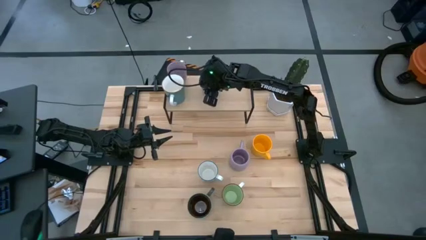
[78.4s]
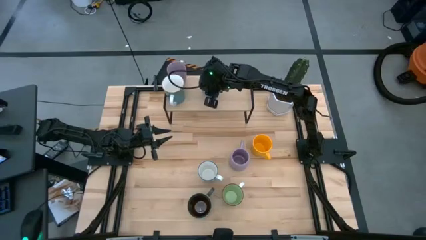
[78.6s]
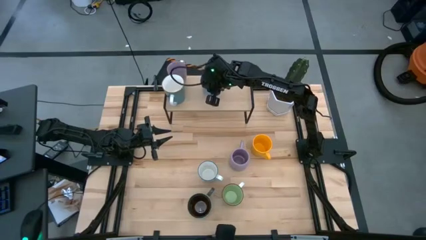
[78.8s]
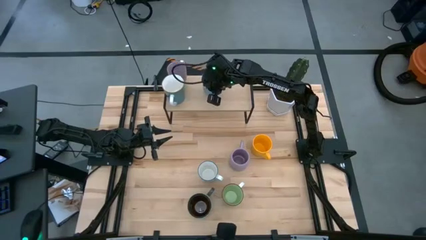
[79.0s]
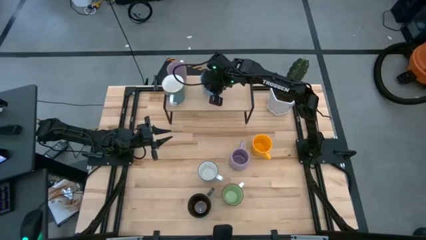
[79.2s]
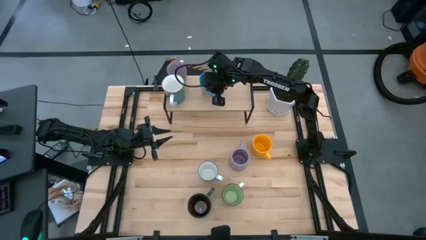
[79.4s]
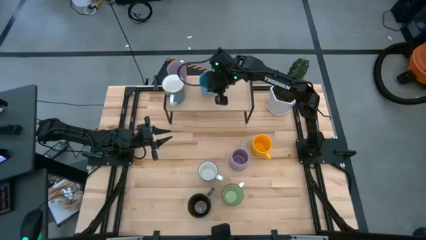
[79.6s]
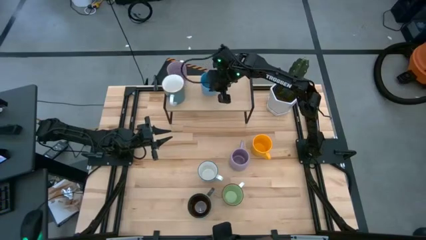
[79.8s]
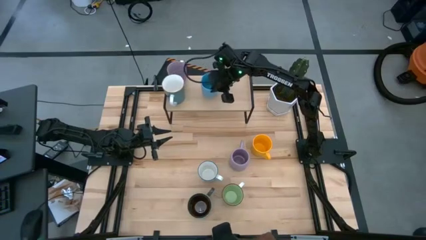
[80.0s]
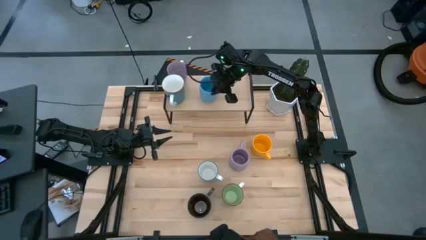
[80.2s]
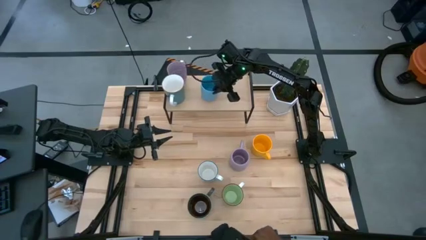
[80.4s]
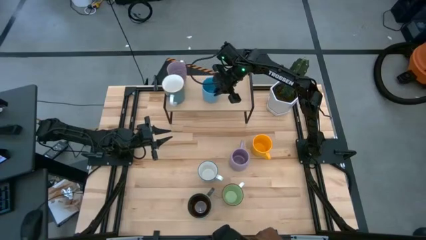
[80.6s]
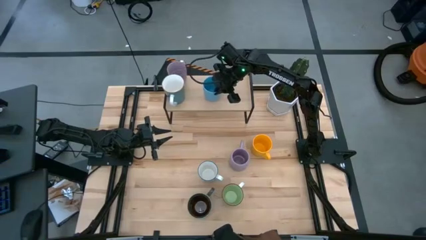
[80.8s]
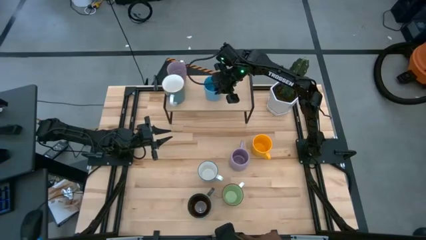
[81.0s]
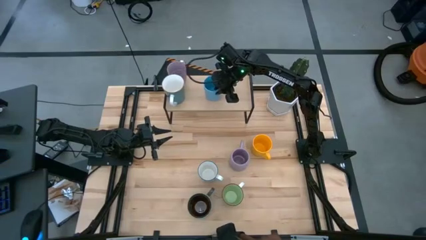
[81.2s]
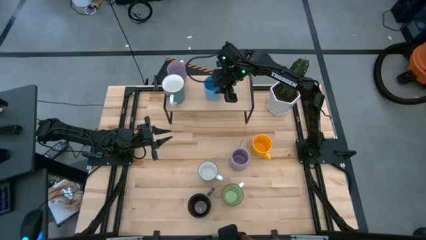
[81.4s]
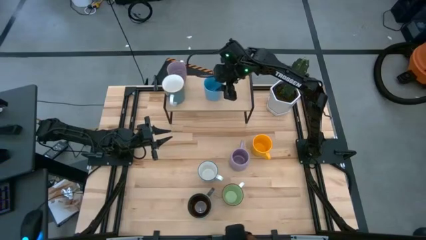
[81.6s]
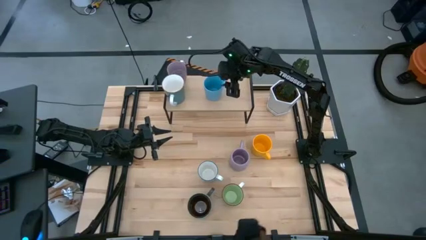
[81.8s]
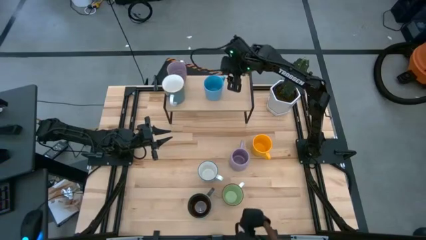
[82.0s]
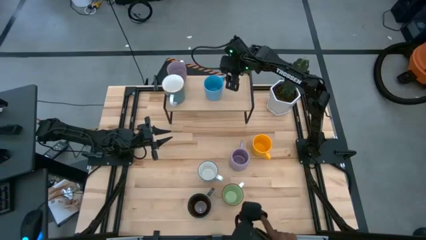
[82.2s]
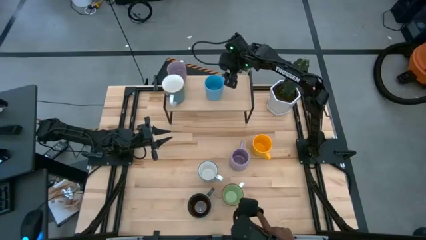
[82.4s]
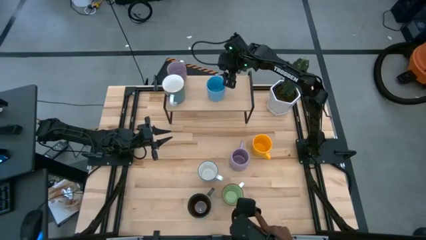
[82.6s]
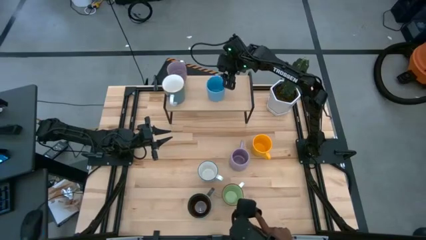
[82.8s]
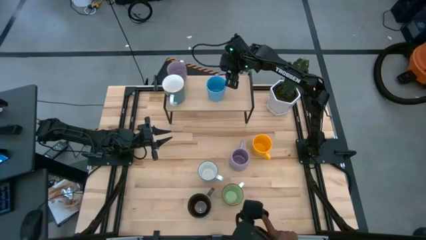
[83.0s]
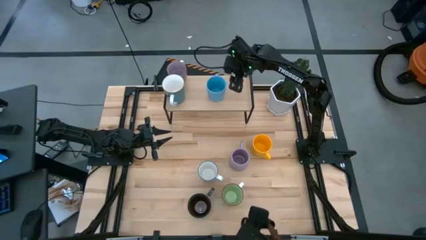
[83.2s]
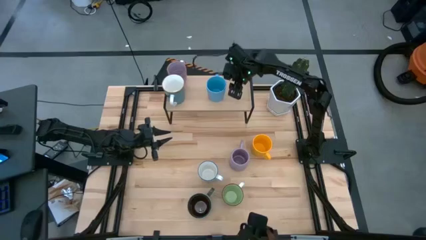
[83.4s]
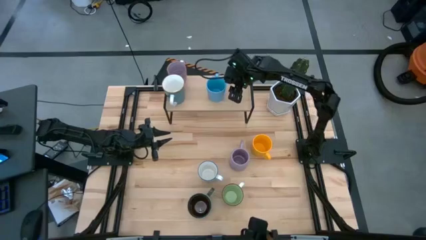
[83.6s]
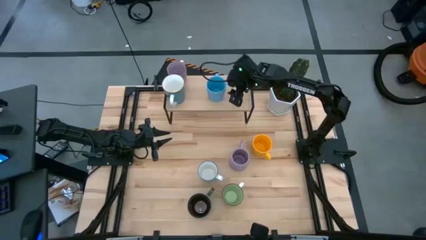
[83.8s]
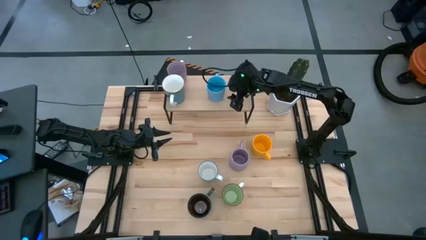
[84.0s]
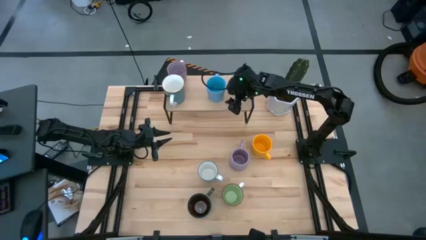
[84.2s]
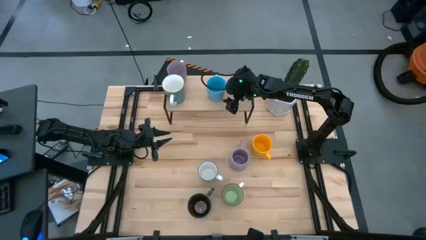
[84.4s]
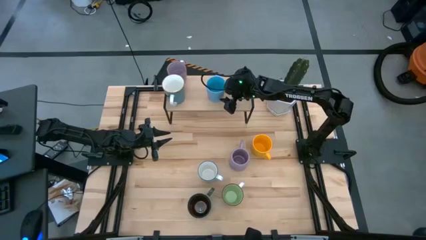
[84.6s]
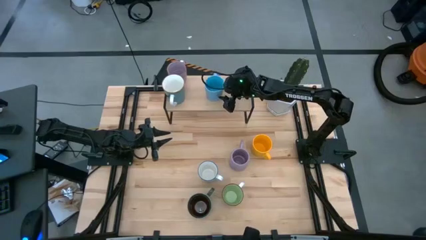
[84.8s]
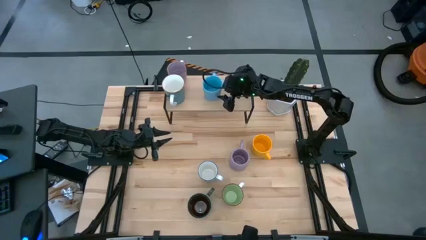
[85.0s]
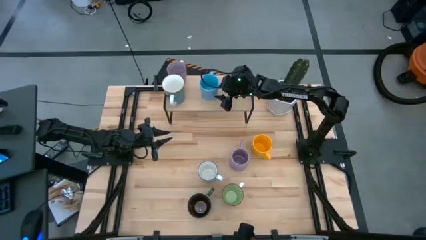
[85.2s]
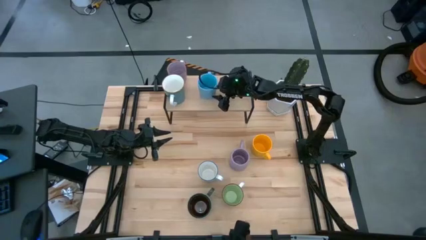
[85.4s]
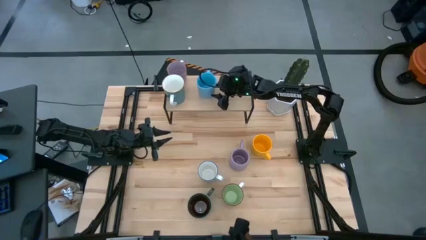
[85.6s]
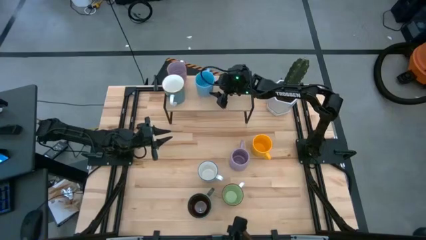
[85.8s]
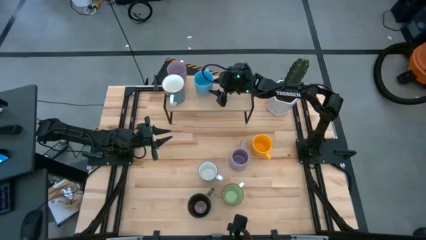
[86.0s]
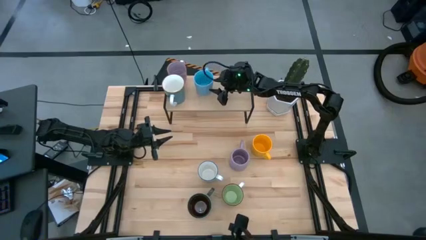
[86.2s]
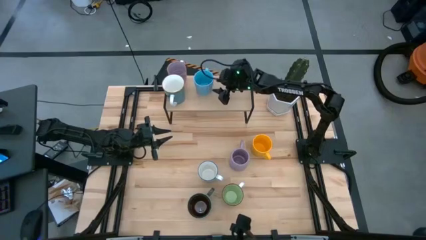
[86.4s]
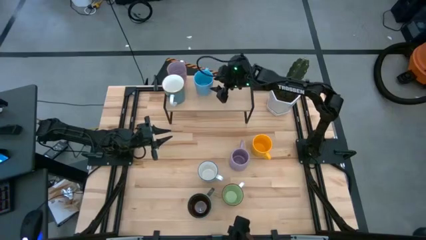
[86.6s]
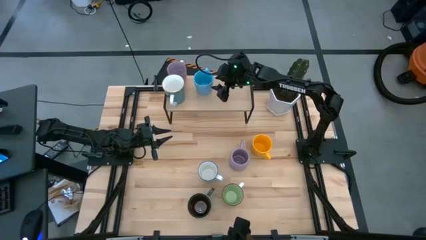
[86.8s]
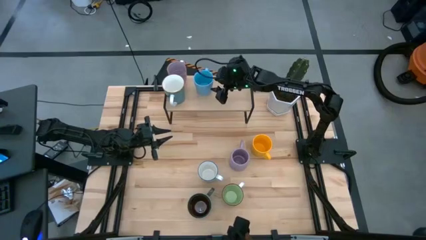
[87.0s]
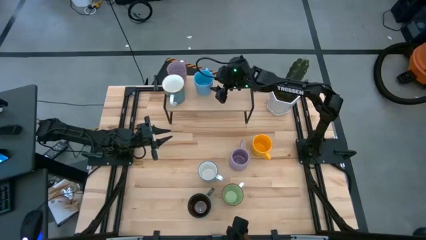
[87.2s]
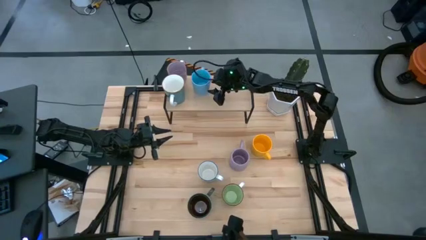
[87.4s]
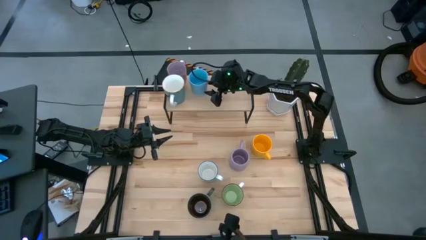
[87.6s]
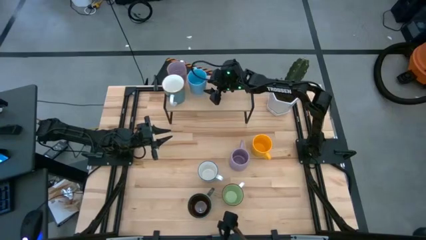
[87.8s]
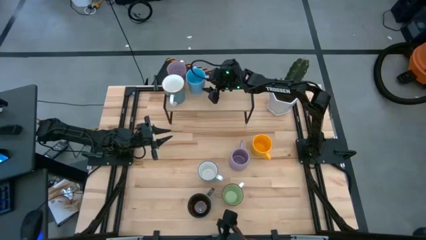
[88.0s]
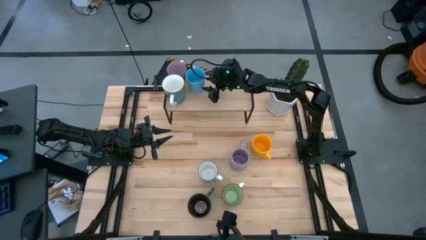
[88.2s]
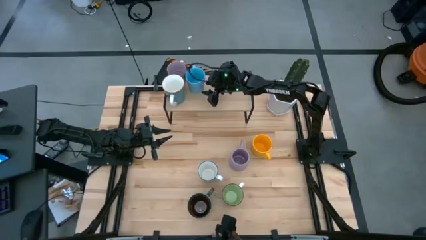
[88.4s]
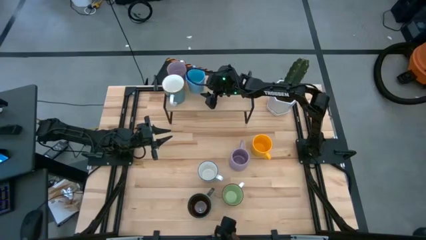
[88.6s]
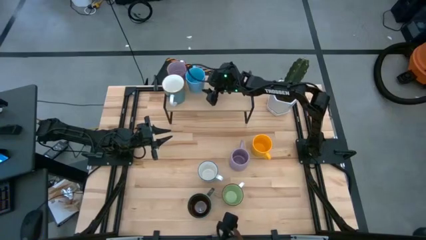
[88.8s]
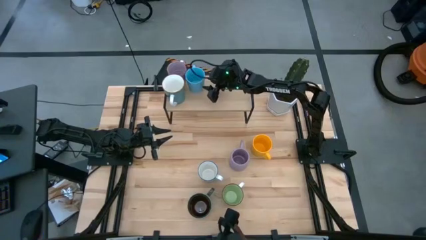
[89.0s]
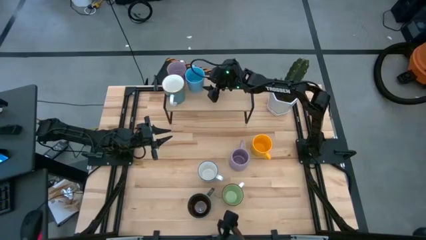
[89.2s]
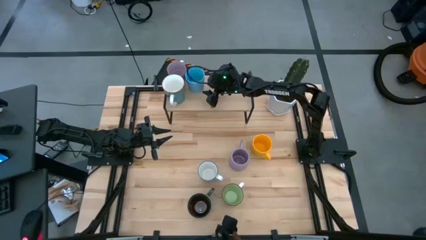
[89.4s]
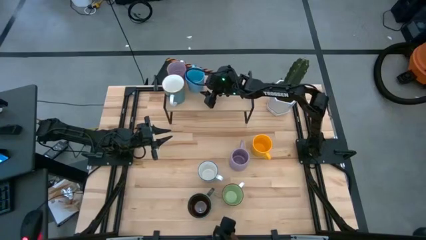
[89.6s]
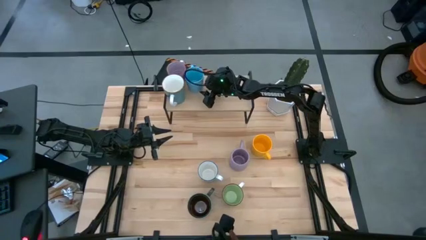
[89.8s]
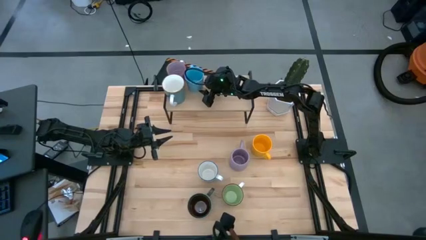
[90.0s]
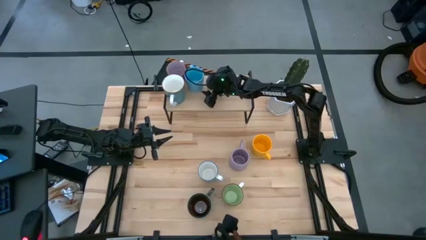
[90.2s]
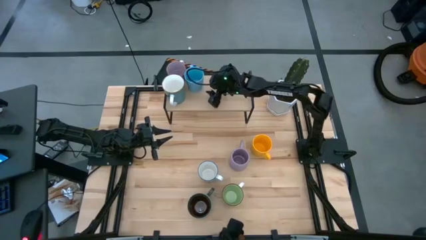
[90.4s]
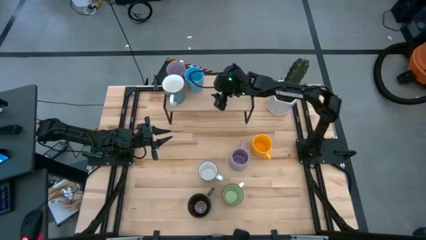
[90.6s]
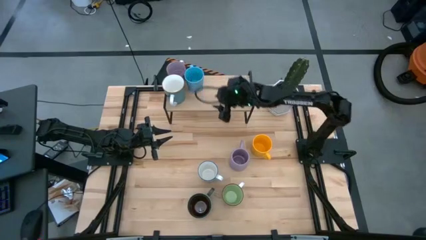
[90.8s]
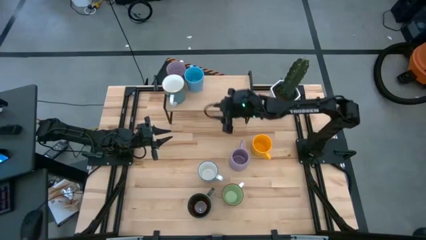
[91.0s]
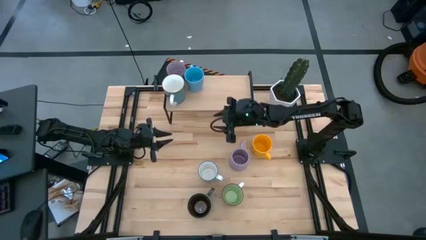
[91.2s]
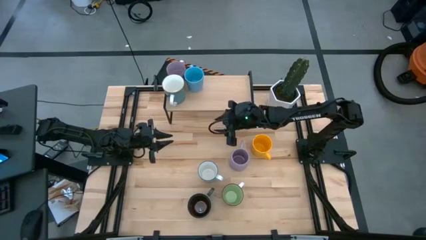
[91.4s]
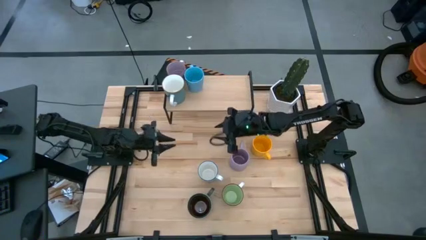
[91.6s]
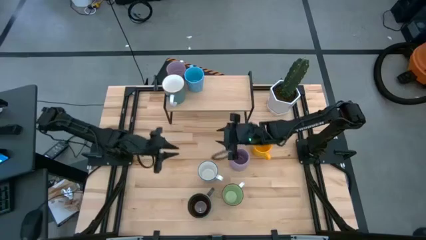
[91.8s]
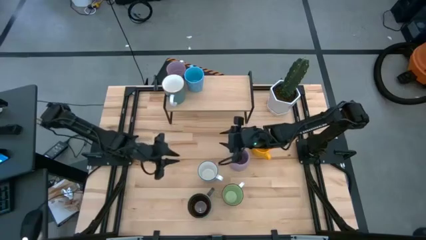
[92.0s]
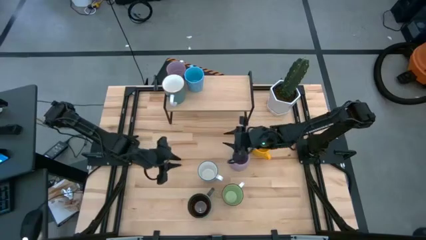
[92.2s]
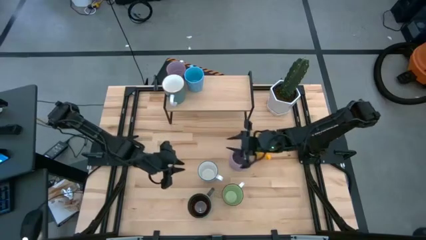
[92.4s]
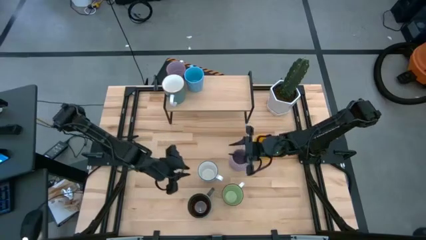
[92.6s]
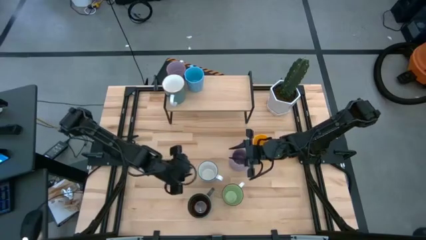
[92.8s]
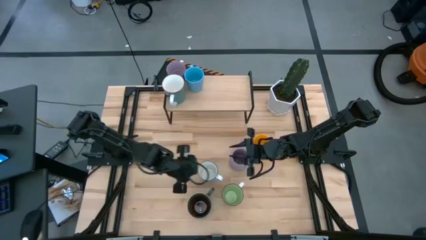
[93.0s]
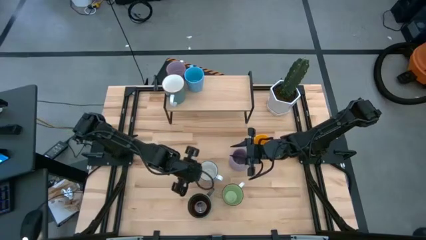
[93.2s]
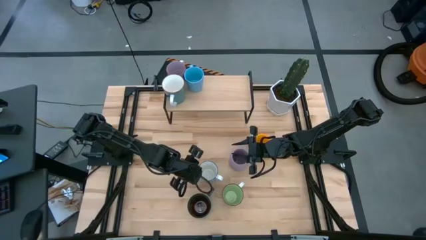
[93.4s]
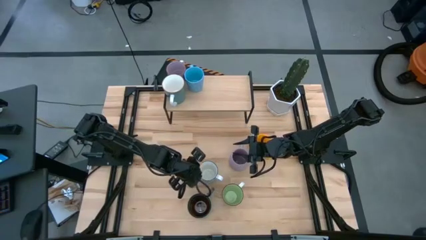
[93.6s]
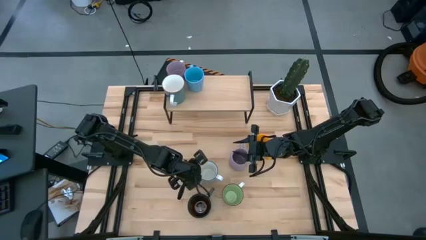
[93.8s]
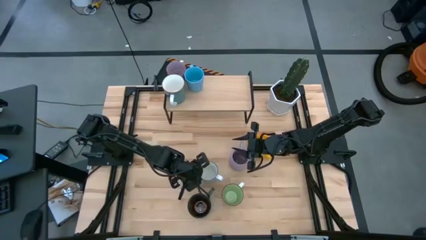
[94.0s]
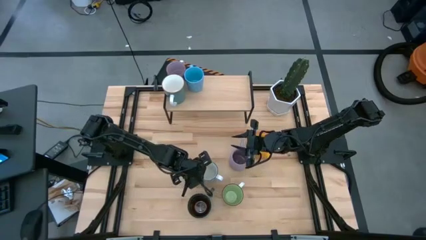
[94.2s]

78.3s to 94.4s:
Task: Place coffee mugs
Put the blue mug on the shelf
